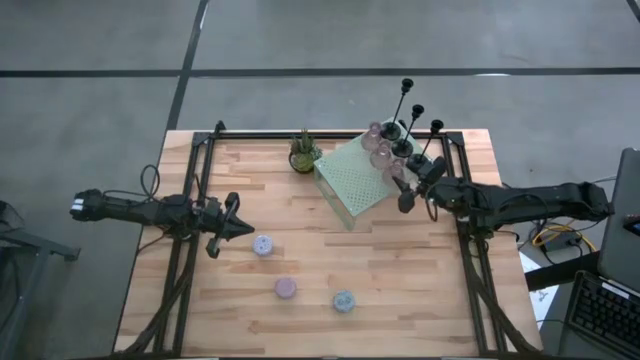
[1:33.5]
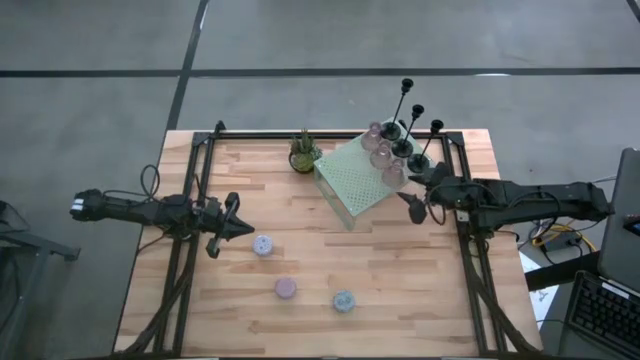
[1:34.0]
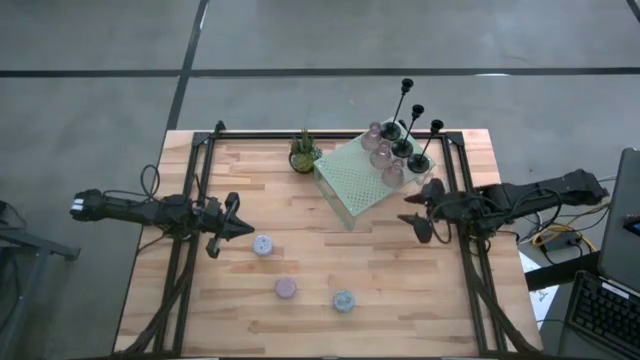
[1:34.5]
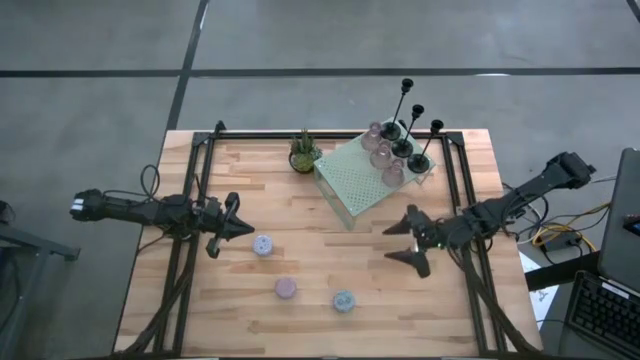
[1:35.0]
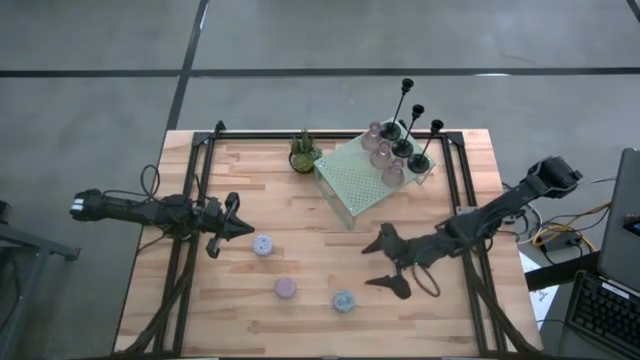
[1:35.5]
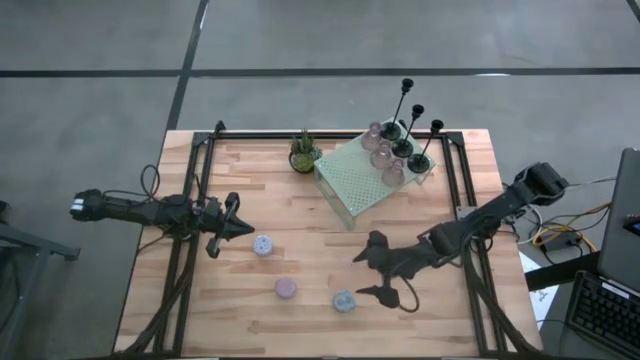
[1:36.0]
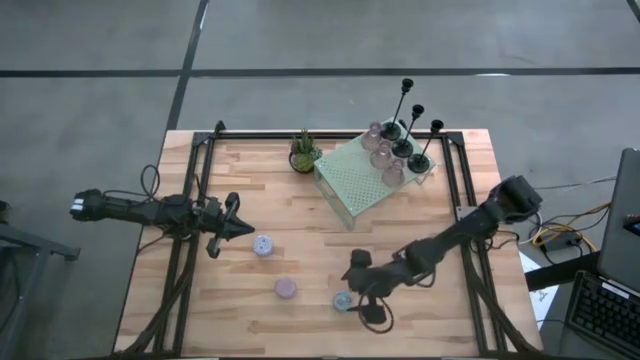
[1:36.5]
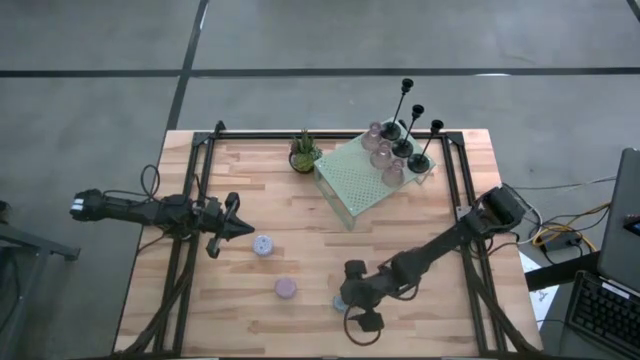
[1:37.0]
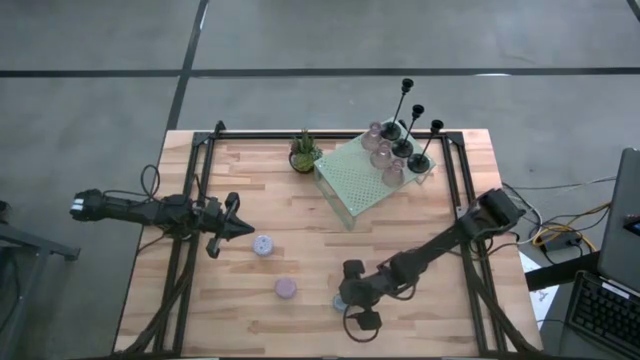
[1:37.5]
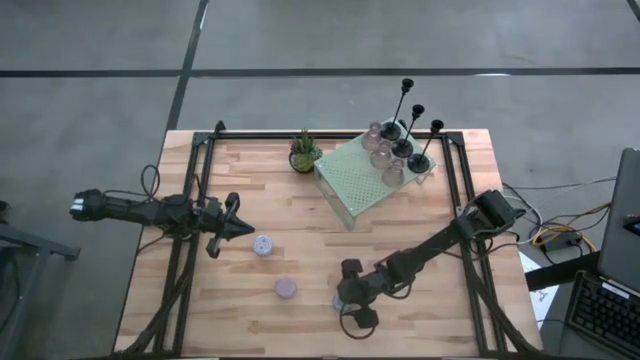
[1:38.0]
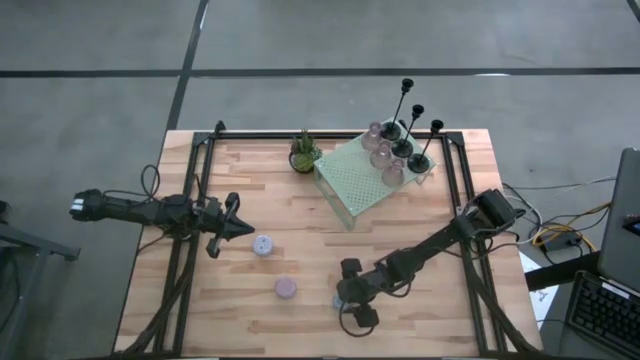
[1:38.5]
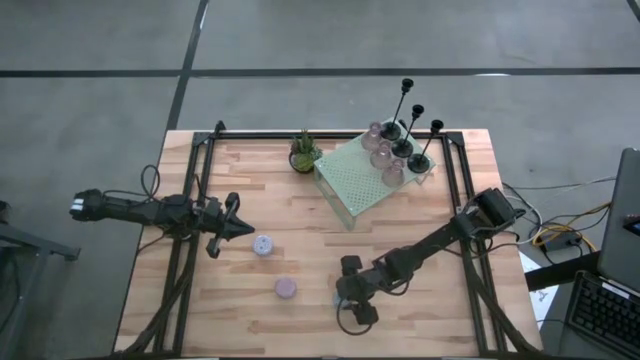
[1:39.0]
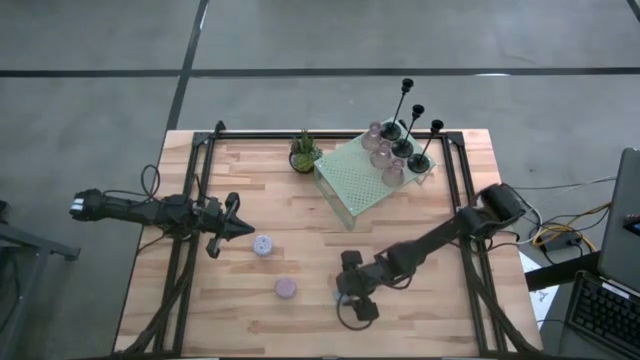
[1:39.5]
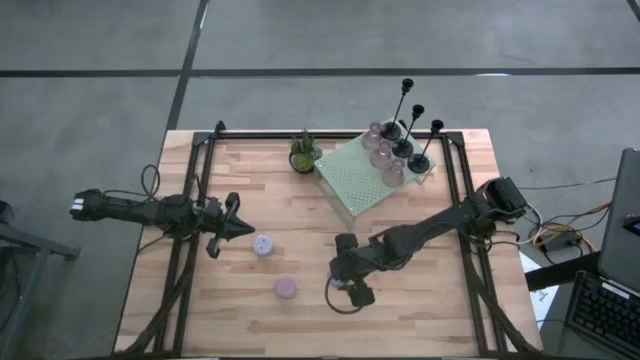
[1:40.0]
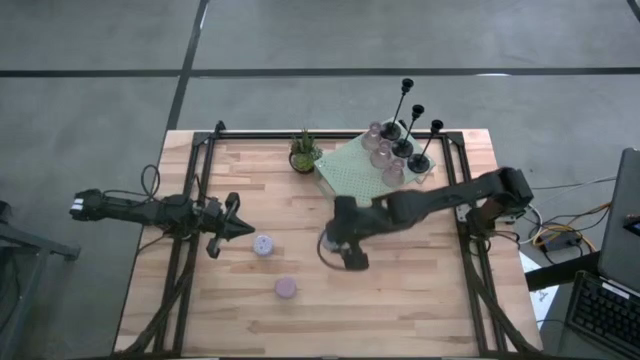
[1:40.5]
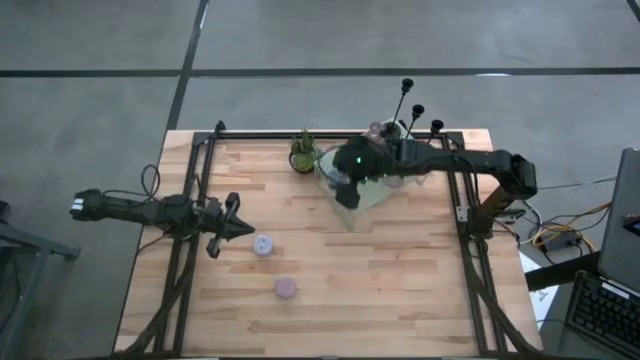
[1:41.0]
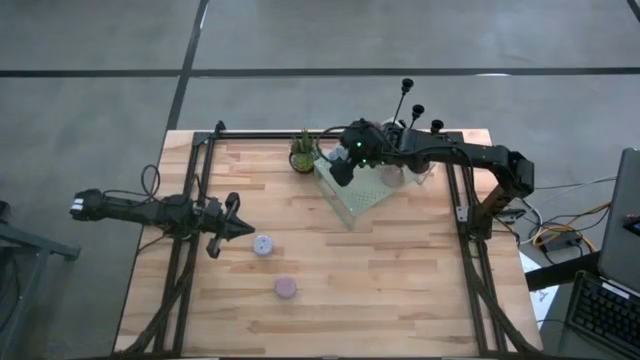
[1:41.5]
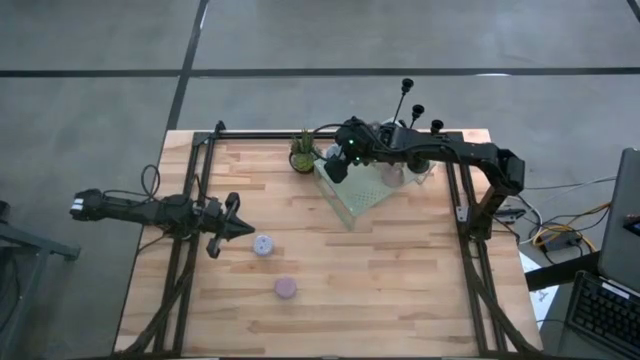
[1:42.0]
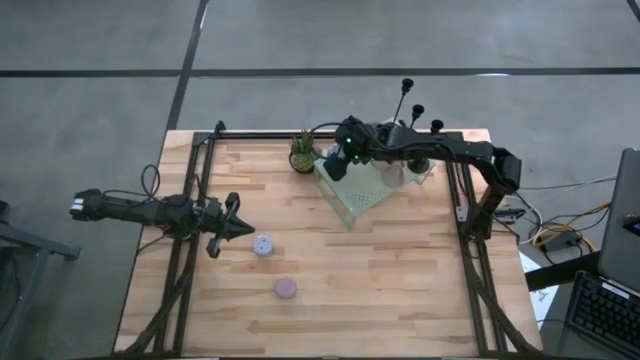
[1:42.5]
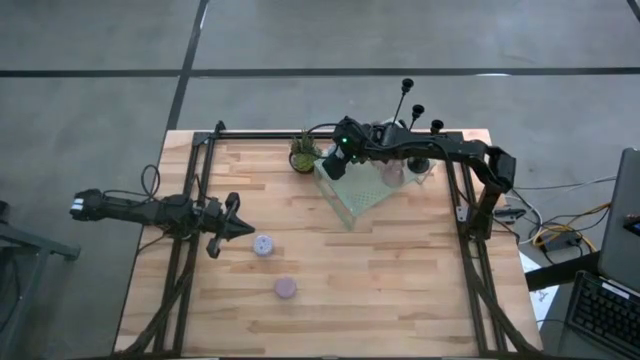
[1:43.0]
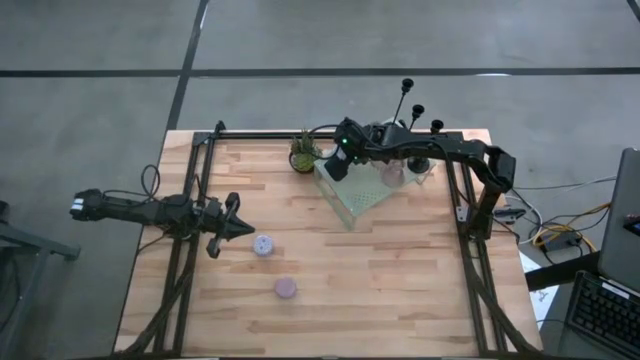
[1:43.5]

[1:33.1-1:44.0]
Task: Pick & Place candle stick holders
Put the blue scented candle on the shelf

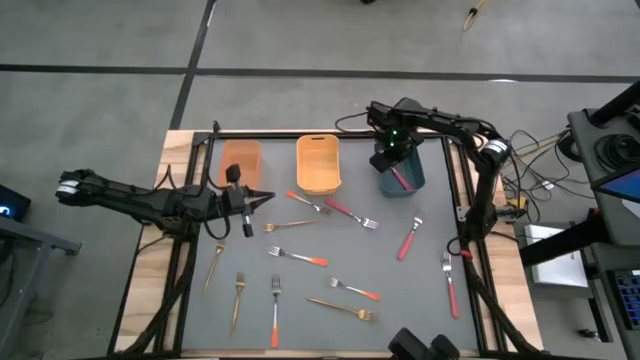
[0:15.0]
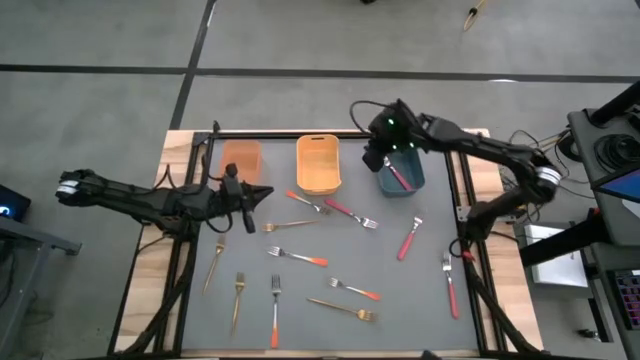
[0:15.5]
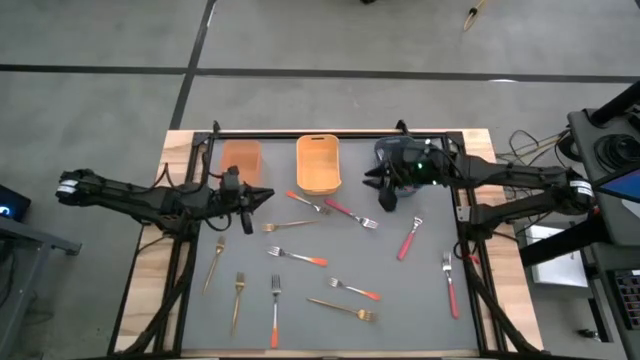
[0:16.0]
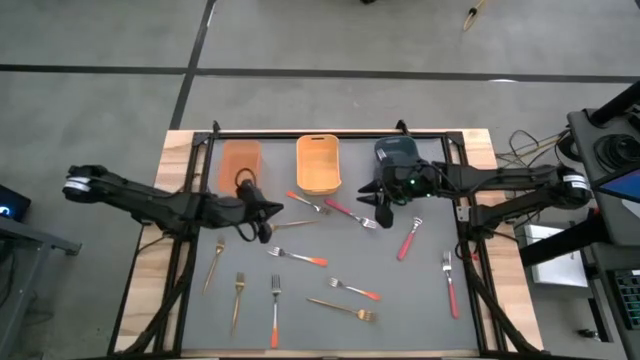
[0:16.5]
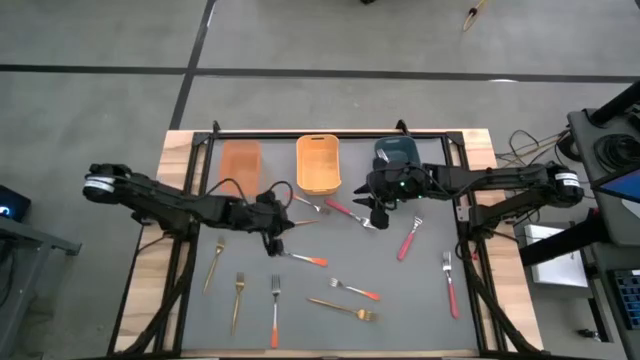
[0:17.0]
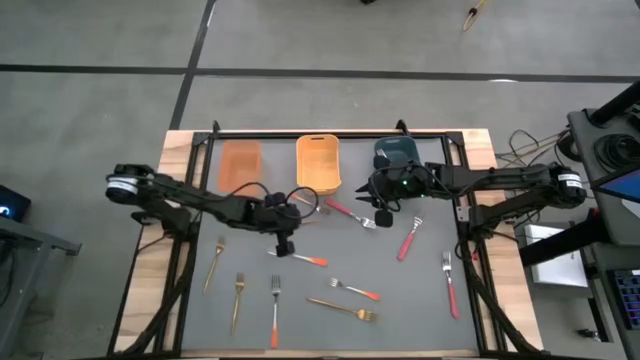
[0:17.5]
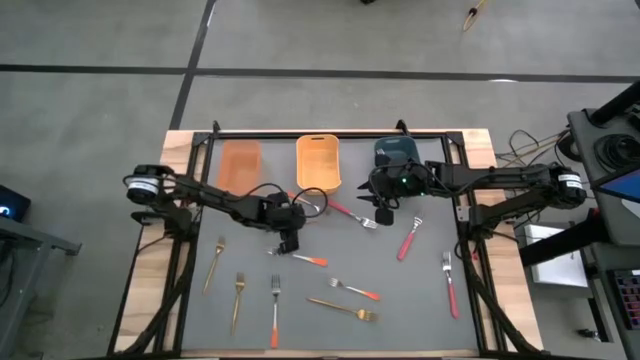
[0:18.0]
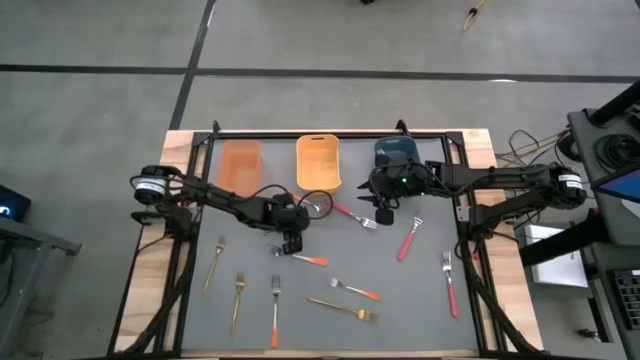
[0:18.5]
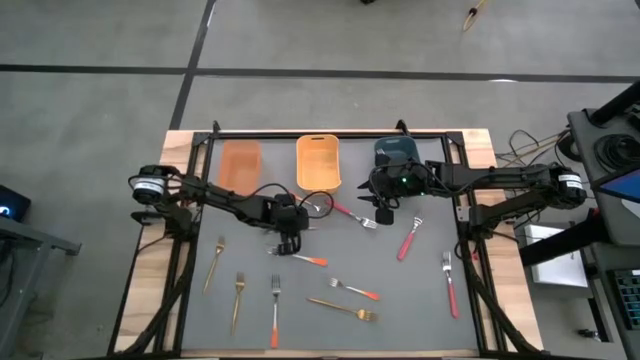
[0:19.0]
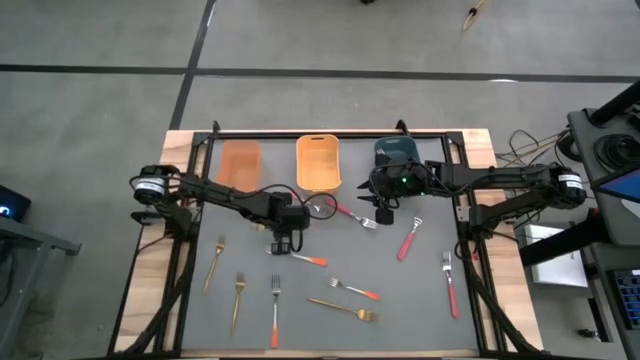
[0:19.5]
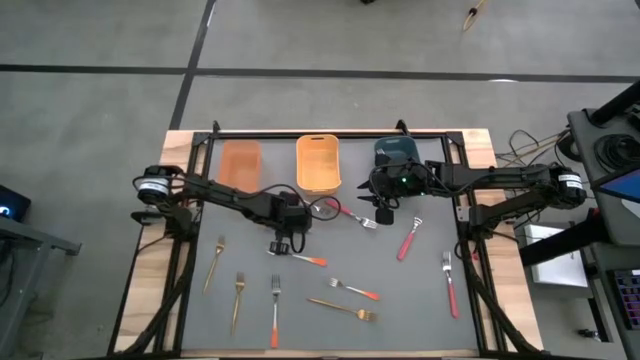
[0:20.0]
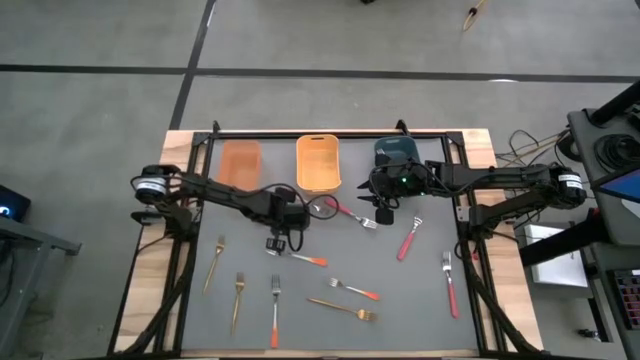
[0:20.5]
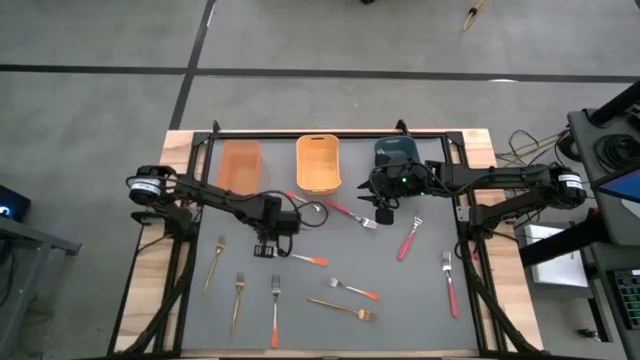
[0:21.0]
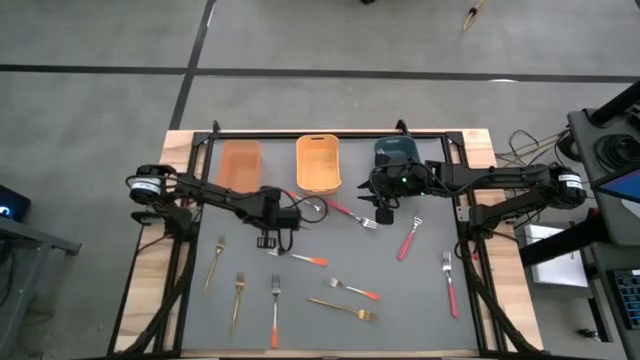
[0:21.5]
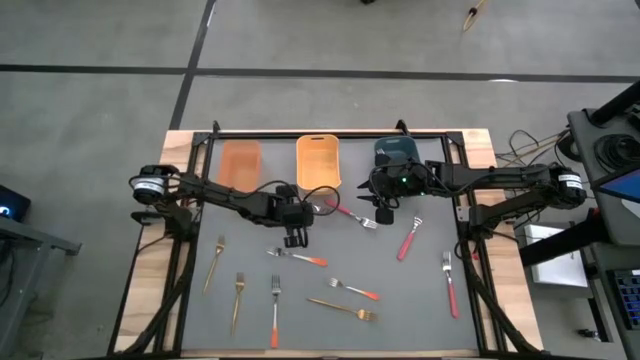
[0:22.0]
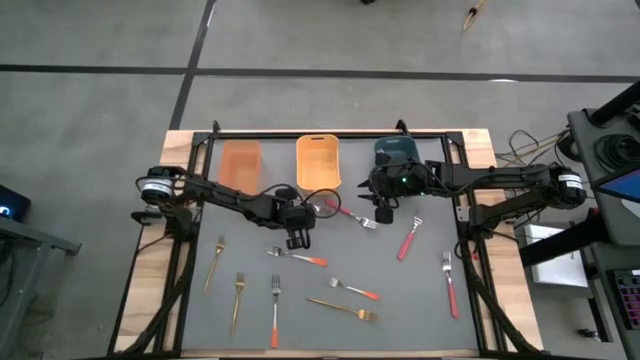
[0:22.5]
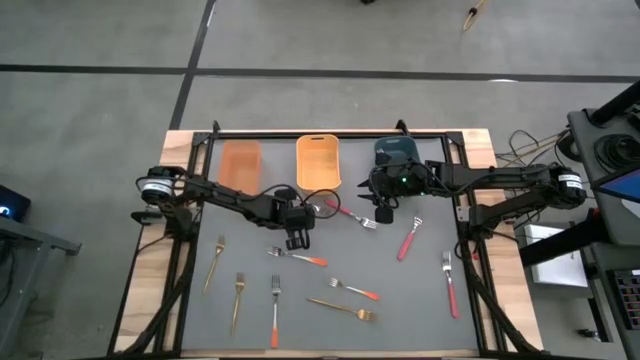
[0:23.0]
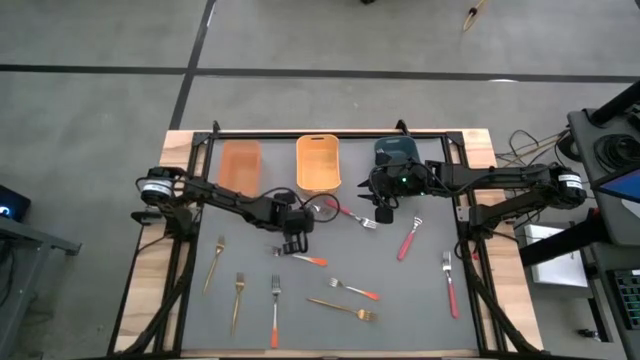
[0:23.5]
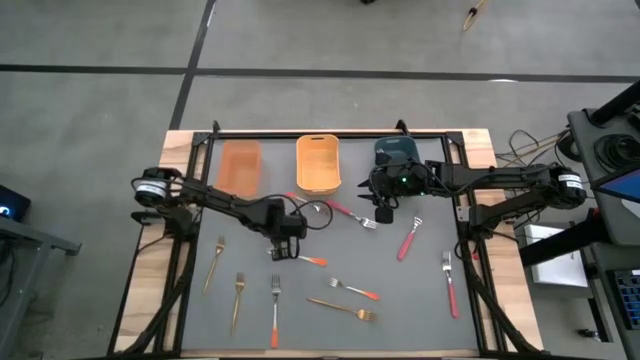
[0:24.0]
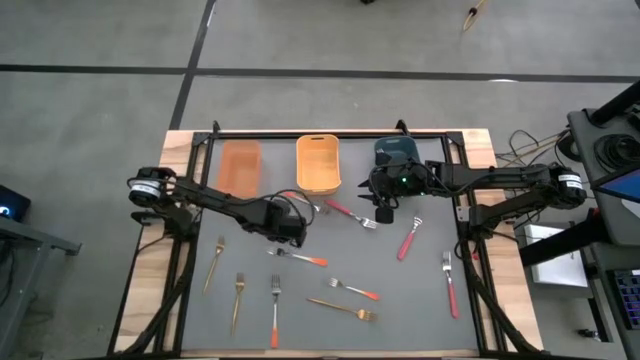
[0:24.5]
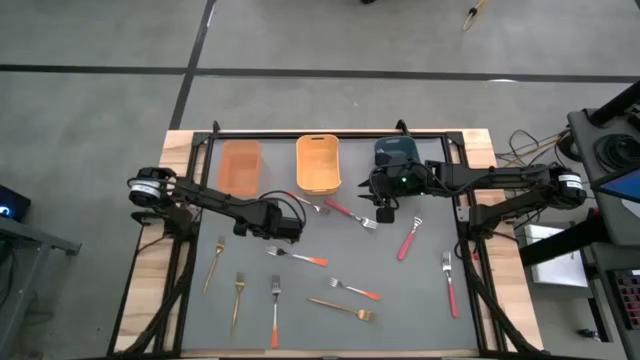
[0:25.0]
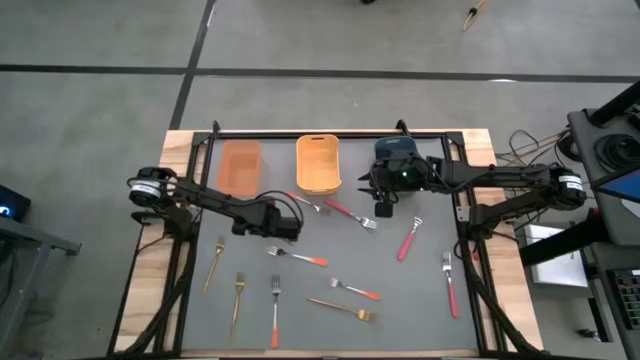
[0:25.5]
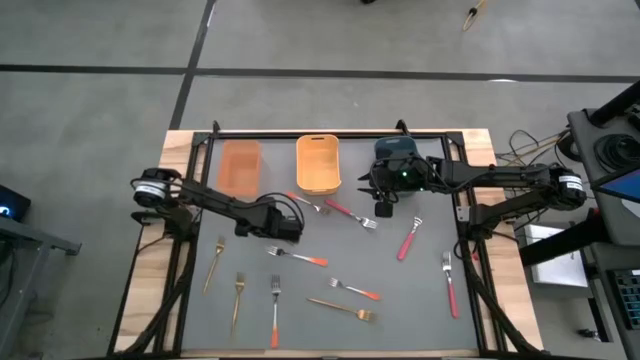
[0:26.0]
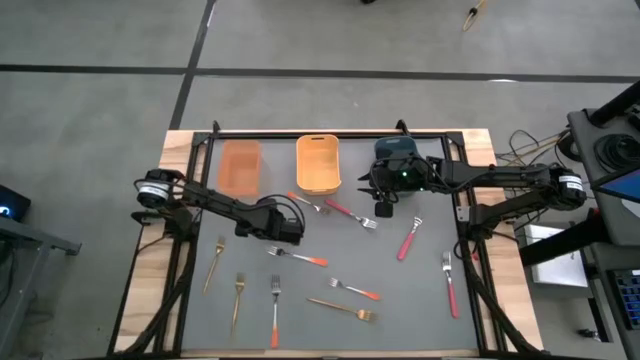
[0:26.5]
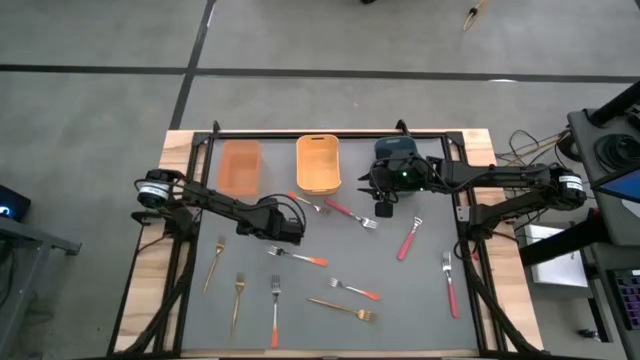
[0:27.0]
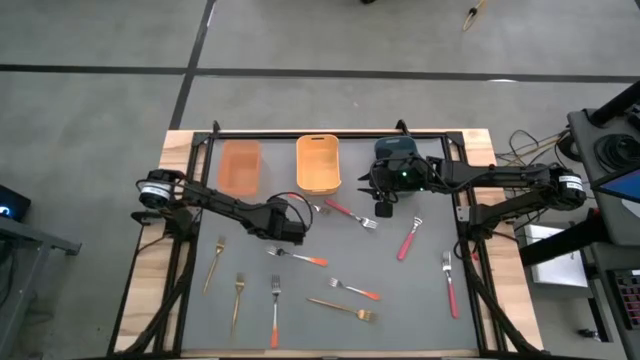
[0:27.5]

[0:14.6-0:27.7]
Task: Sort silverware by color (type)
Put the gold fork into the orange bin
